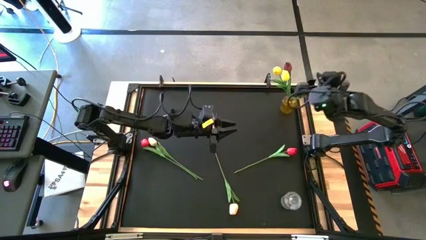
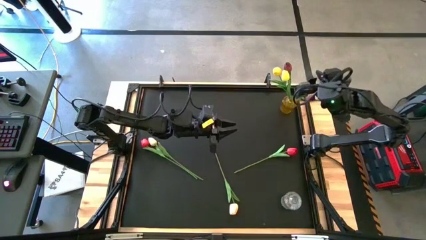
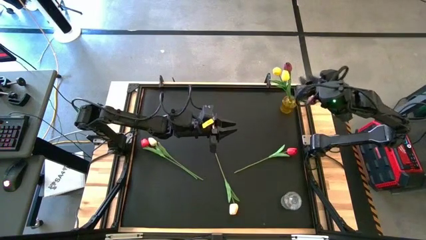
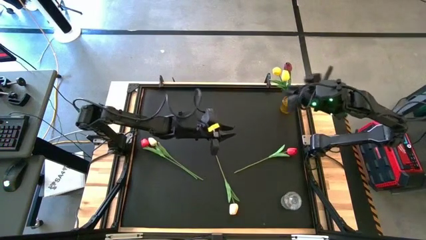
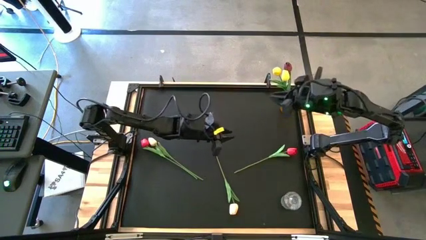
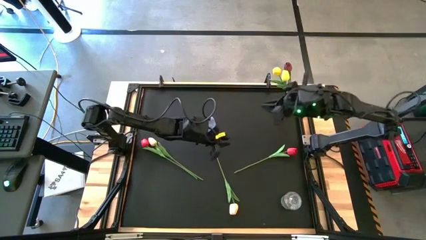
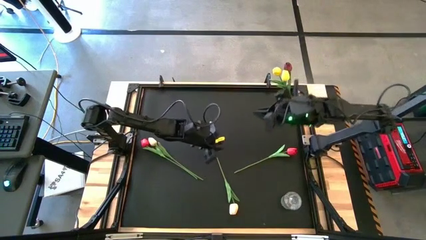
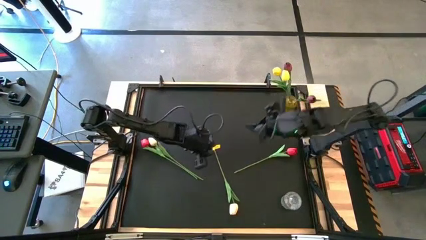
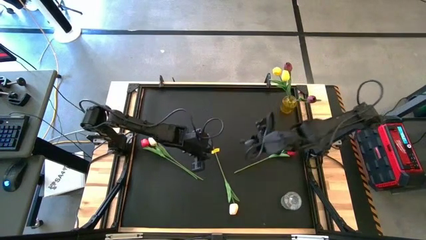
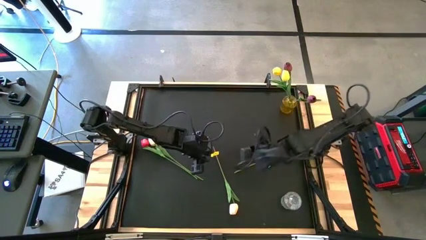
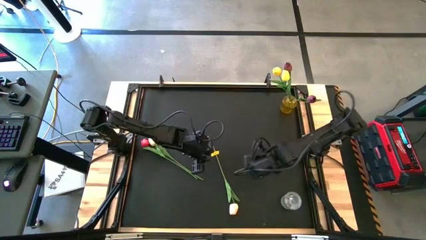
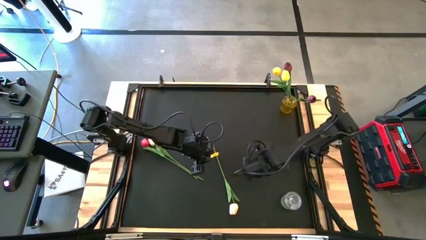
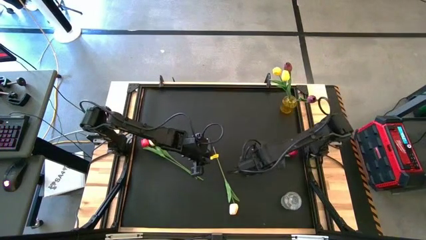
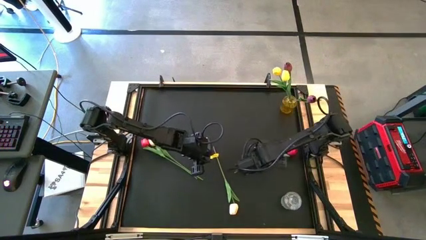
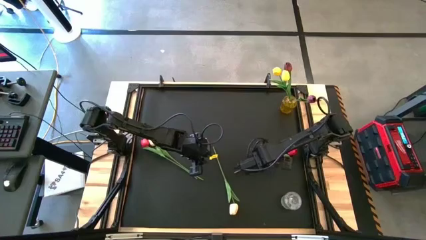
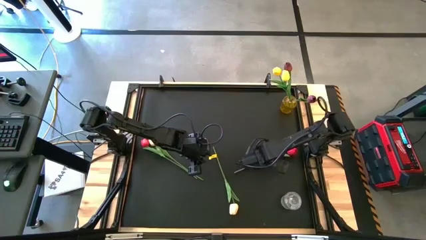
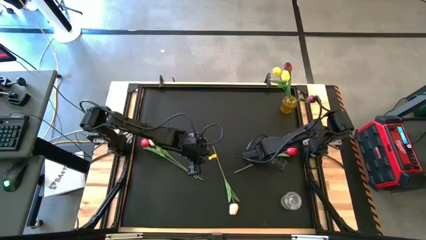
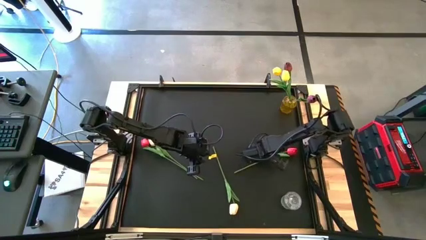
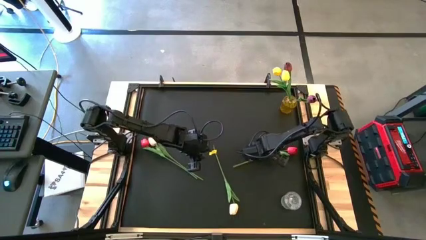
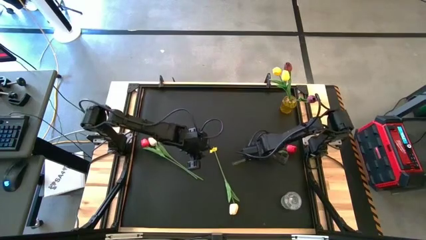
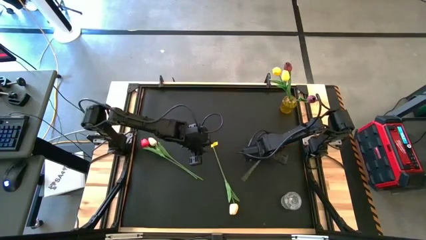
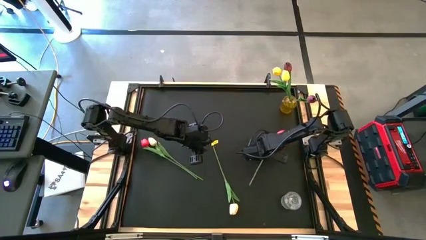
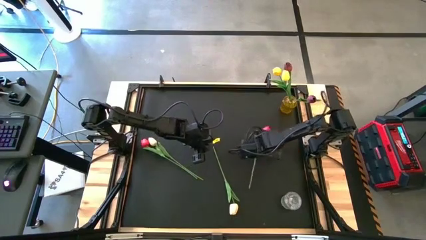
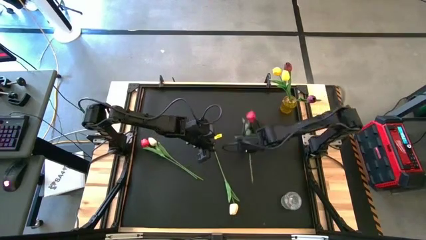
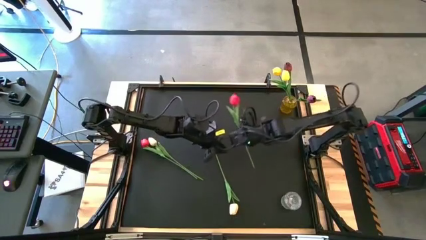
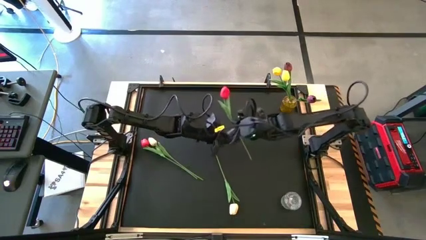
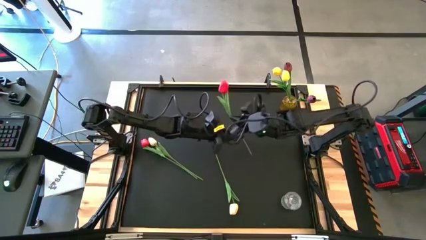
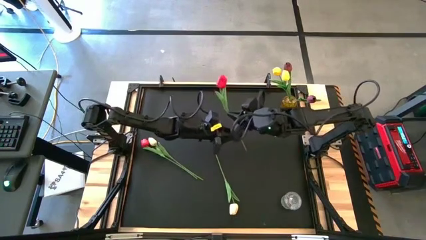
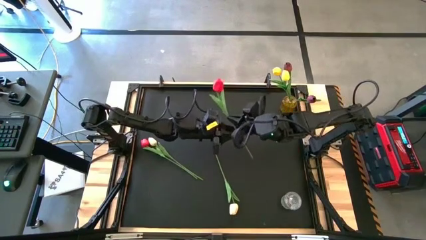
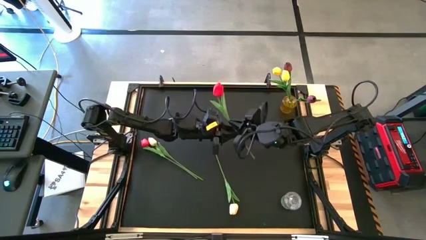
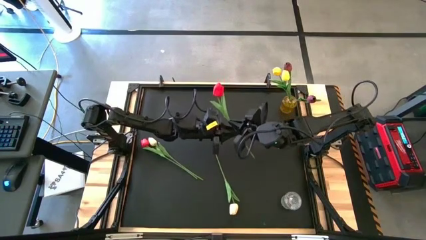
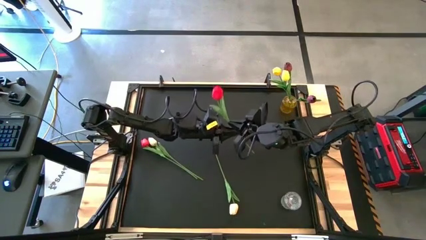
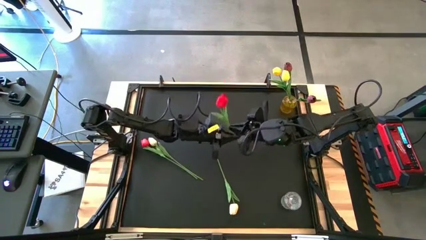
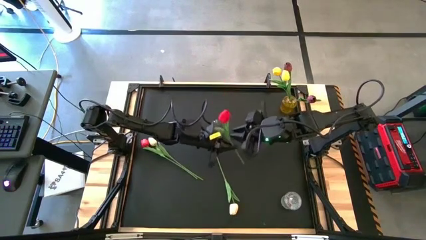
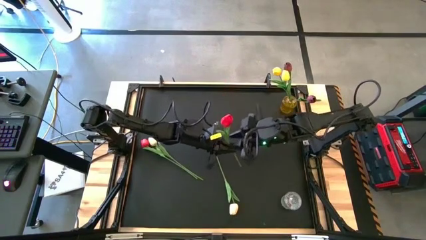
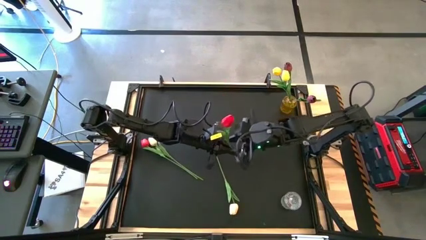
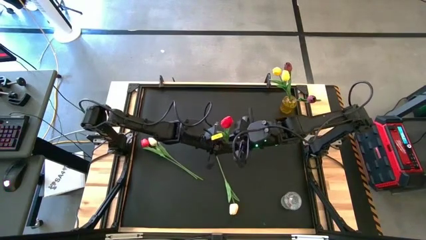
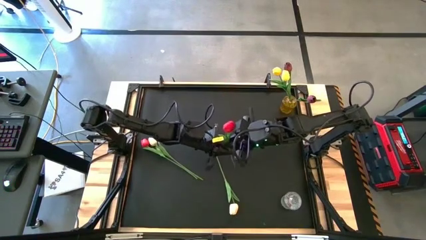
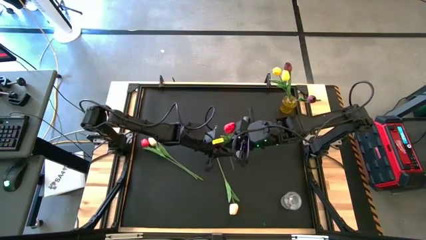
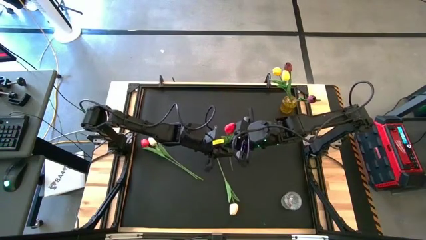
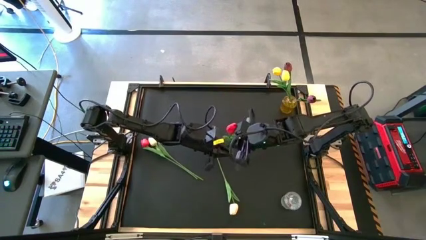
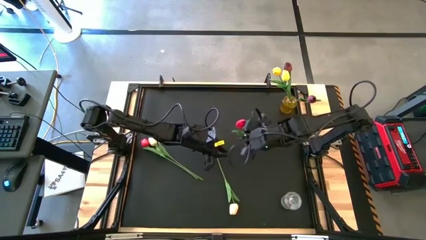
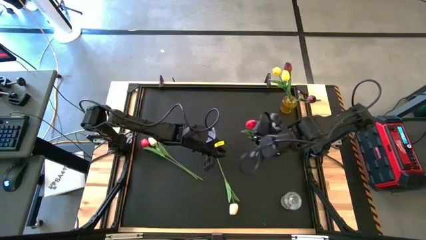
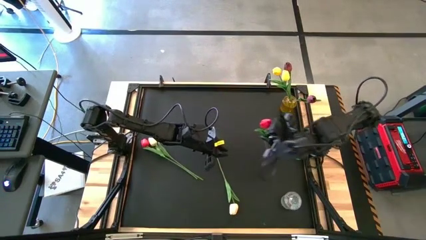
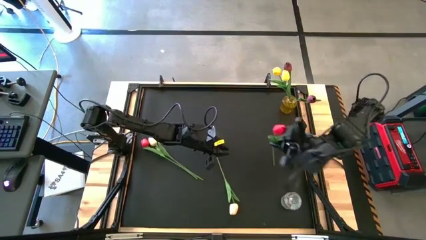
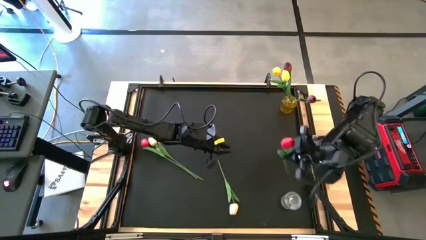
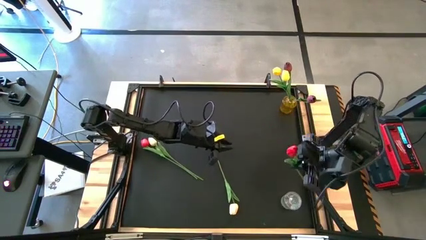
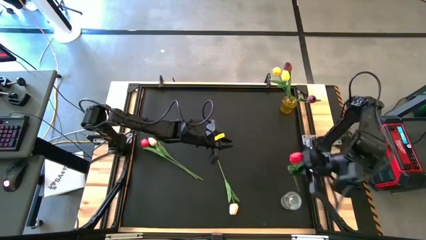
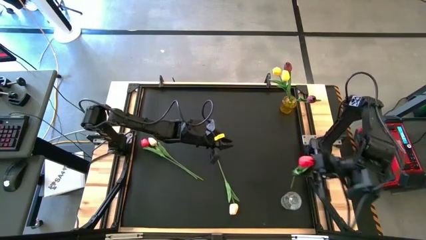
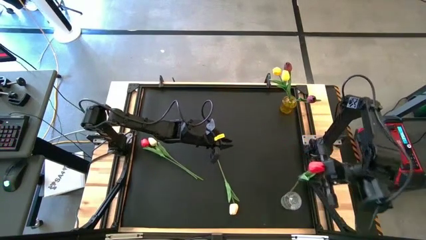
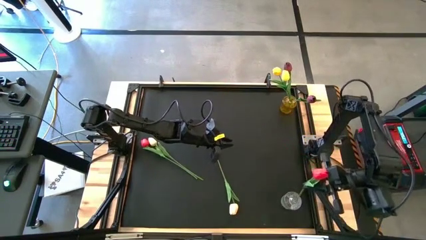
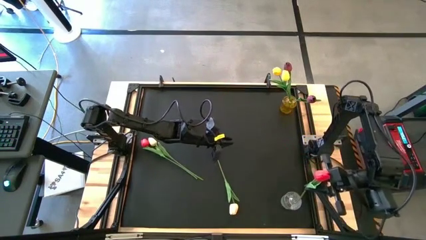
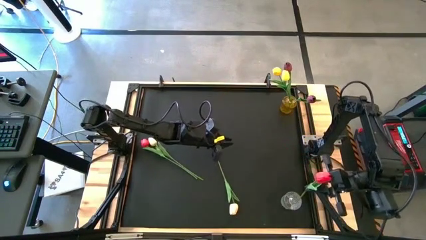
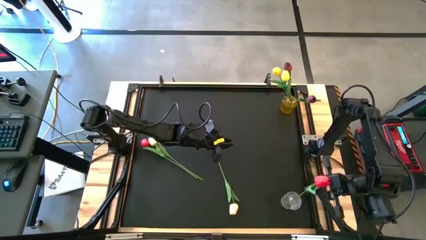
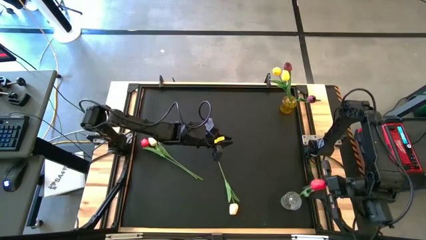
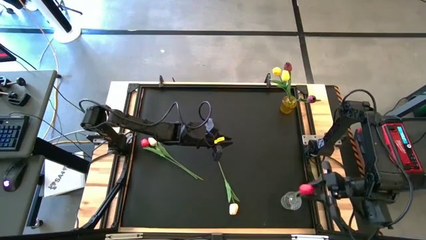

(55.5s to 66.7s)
Task: Sort flowers into vase by color
Put the right red flower into the transparent vase
